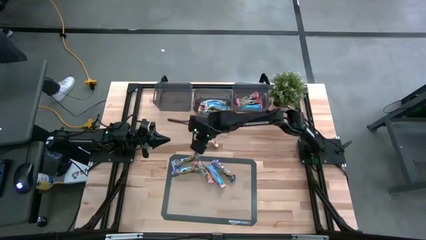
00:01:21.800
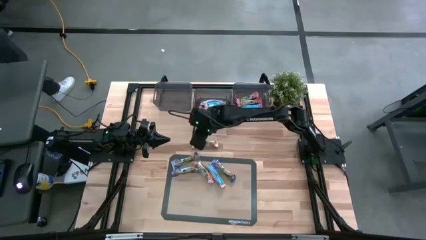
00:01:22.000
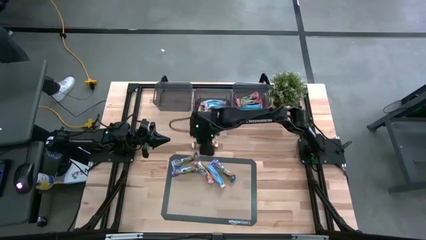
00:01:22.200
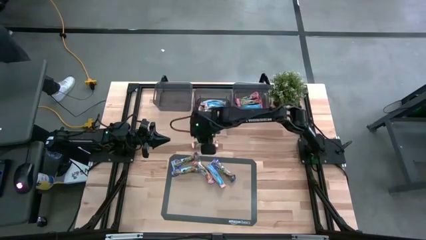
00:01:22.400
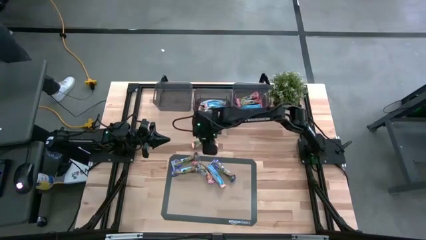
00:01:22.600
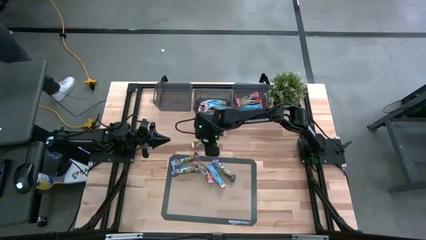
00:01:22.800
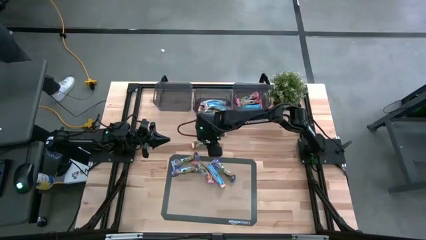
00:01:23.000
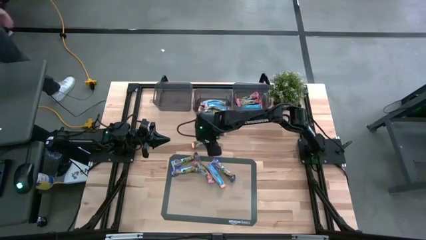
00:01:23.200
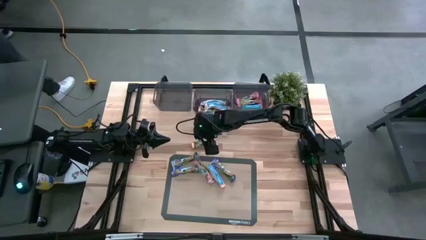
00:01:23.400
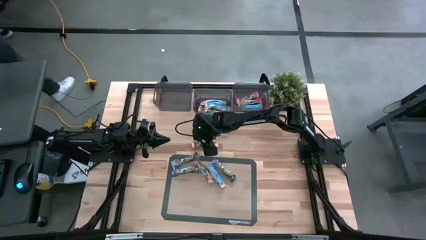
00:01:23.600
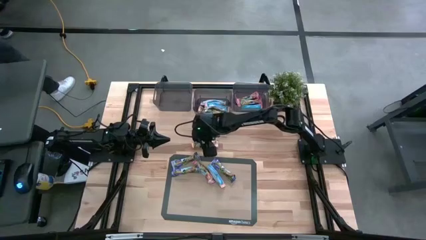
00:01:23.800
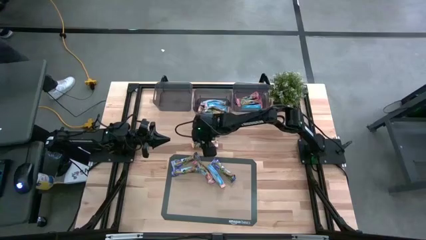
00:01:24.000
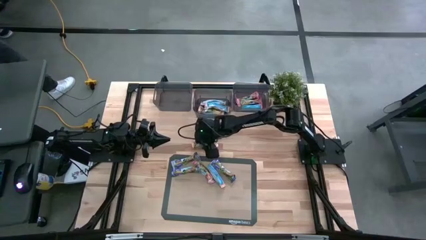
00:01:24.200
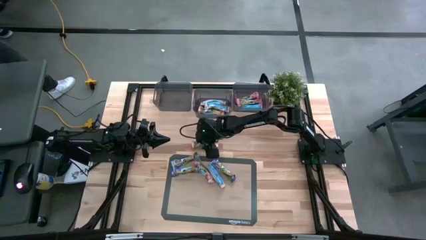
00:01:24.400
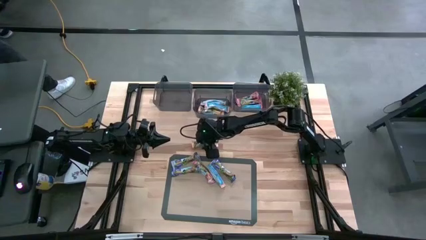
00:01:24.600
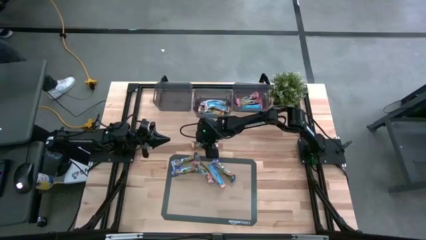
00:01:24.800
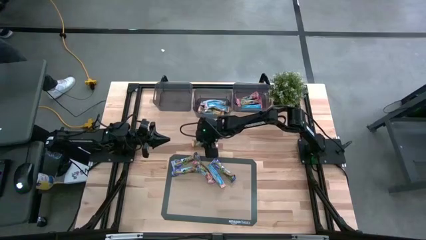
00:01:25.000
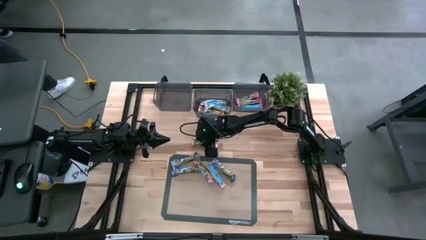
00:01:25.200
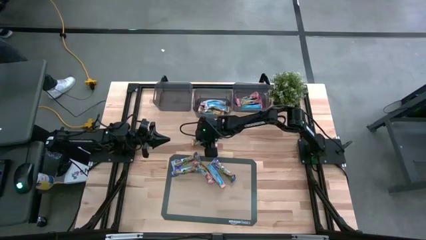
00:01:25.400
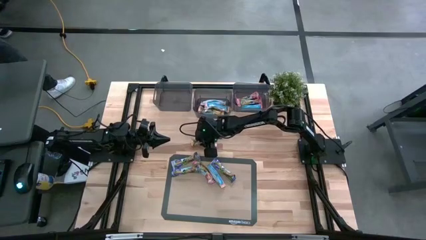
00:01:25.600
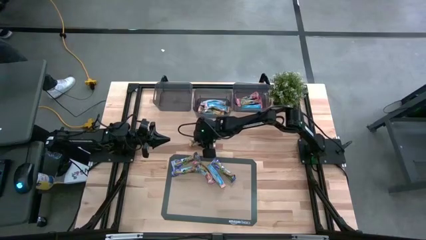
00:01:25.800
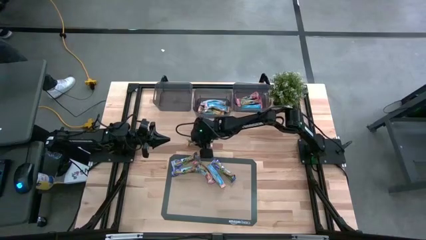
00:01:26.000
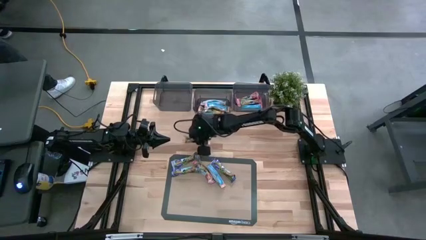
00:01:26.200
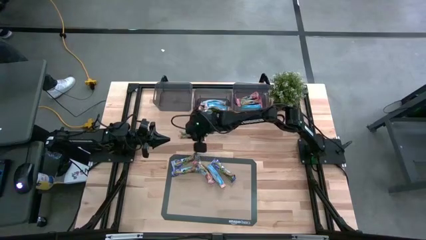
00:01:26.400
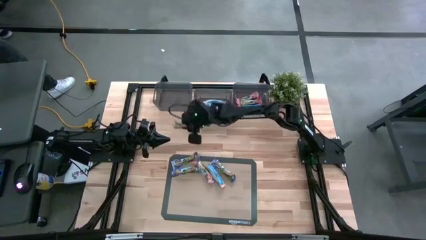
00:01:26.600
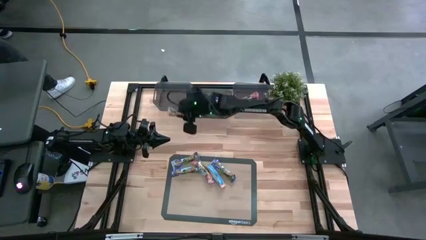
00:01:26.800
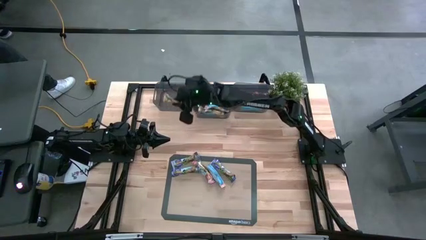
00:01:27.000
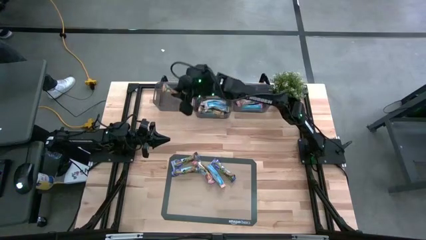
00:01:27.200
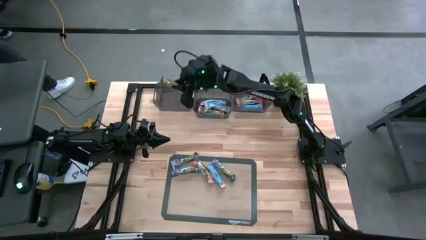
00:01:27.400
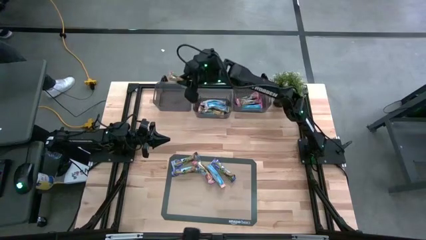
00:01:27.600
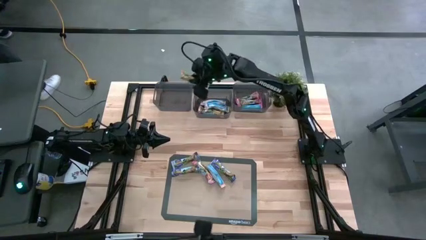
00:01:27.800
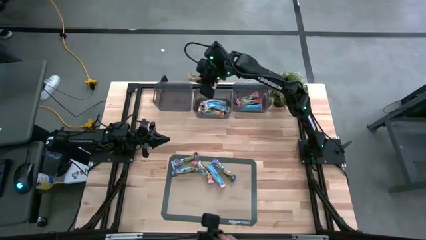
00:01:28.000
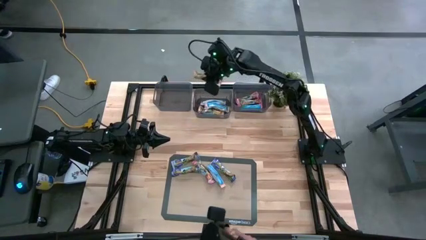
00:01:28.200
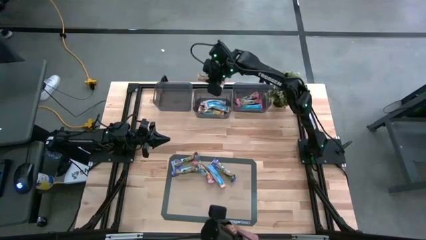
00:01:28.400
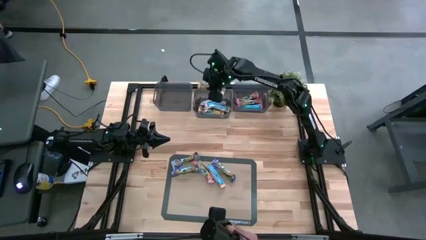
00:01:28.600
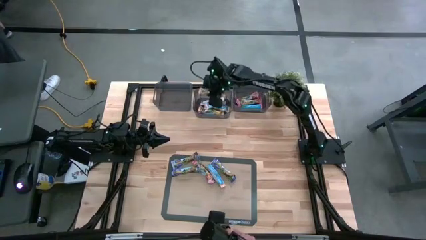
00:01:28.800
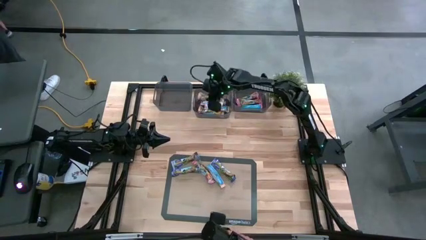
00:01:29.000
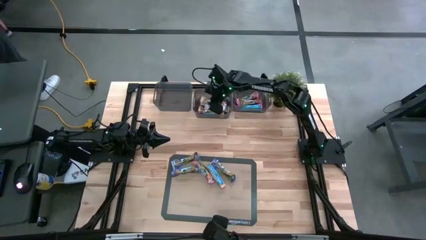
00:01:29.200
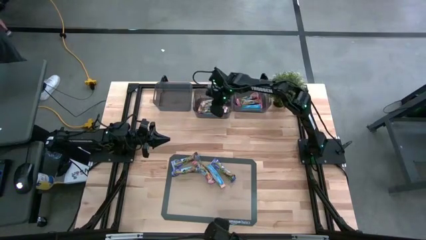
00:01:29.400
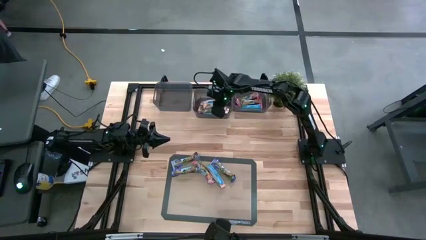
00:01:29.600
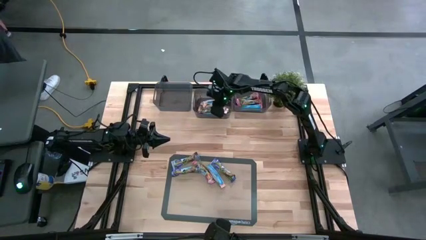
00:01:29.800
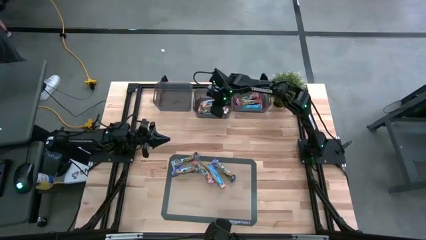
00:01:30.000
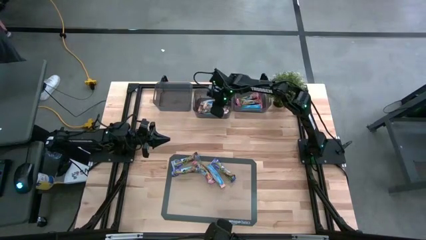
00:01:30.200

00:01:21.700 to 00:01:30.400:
Task: Pick and place Granola Bars by type
Put the yellow granola bar into the center black bin

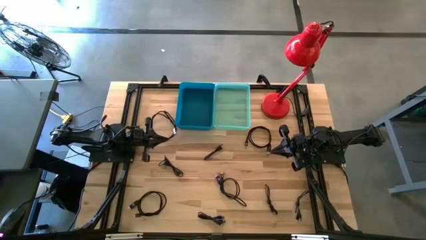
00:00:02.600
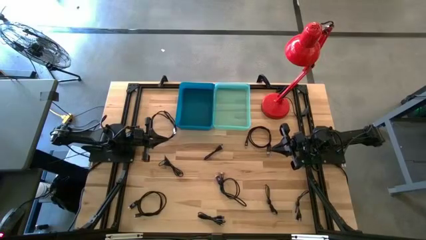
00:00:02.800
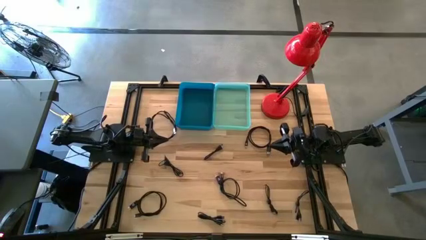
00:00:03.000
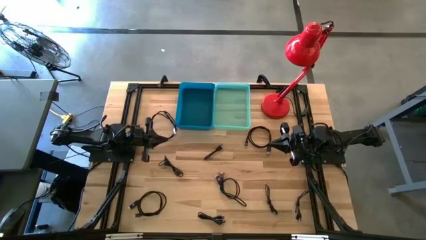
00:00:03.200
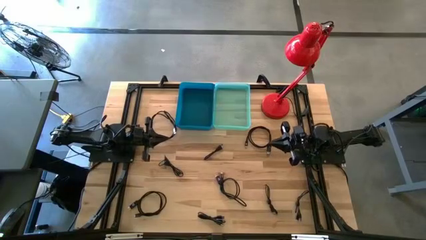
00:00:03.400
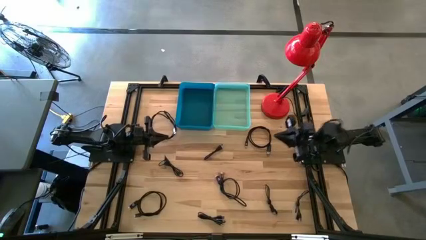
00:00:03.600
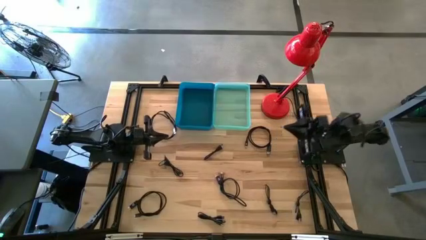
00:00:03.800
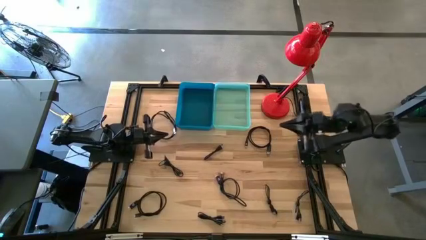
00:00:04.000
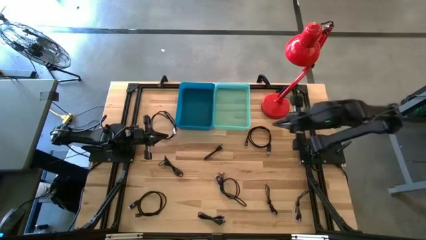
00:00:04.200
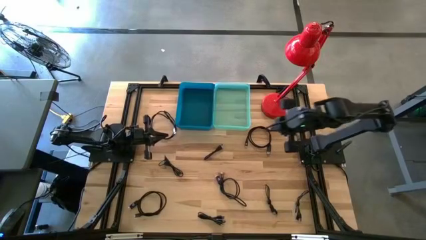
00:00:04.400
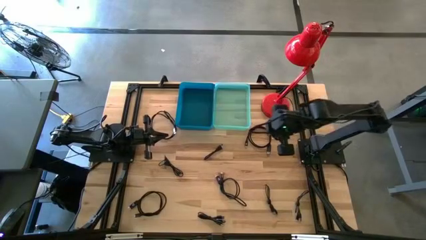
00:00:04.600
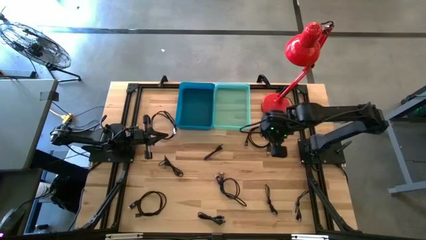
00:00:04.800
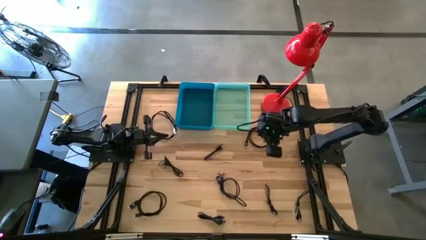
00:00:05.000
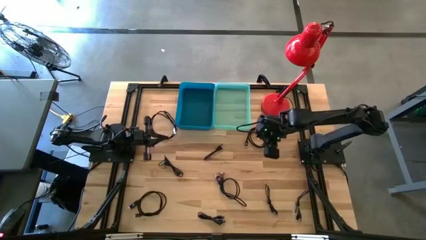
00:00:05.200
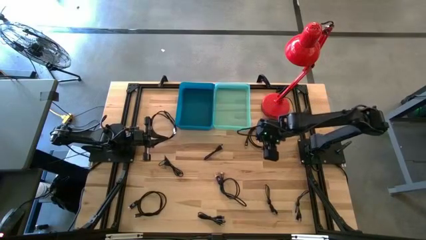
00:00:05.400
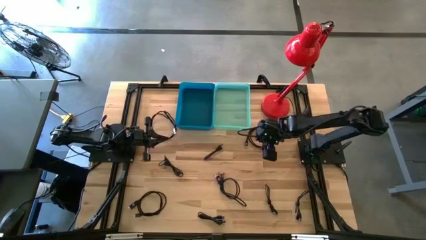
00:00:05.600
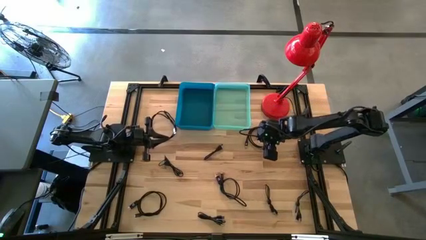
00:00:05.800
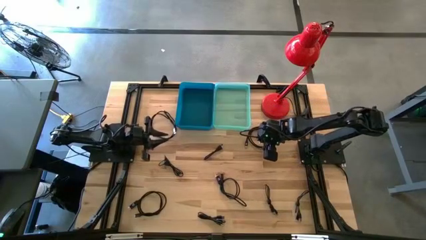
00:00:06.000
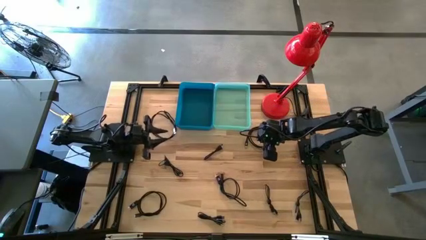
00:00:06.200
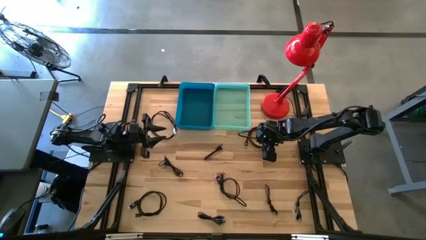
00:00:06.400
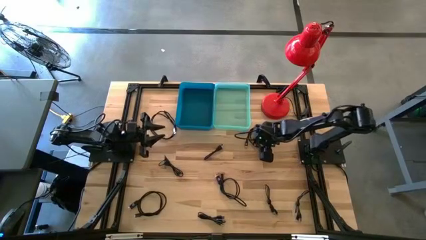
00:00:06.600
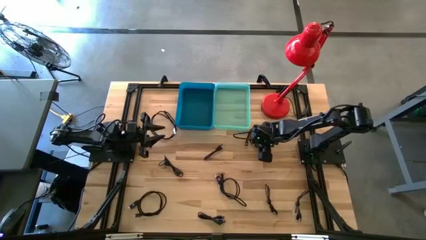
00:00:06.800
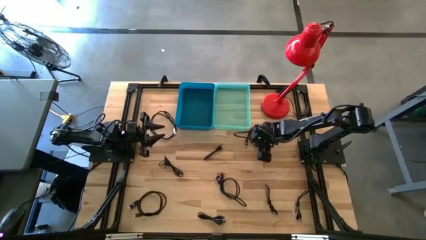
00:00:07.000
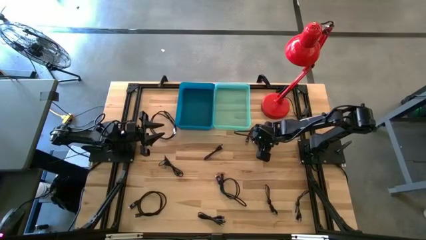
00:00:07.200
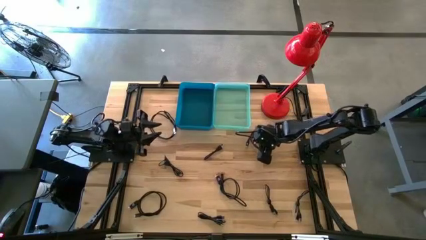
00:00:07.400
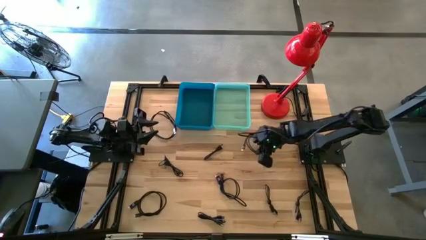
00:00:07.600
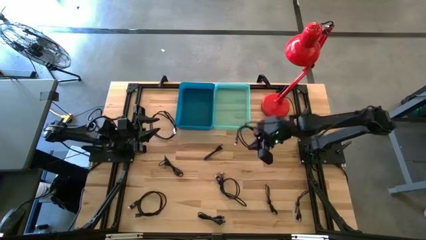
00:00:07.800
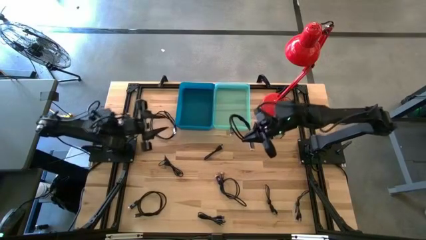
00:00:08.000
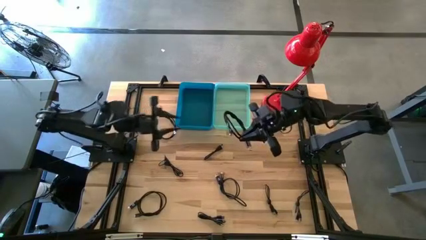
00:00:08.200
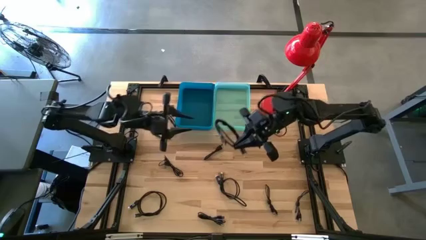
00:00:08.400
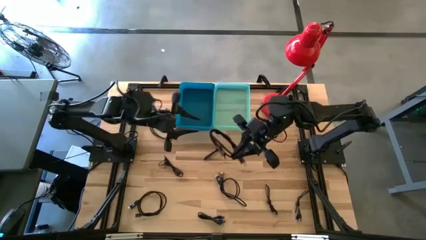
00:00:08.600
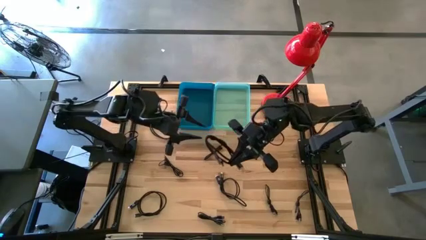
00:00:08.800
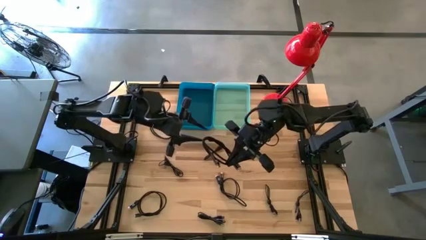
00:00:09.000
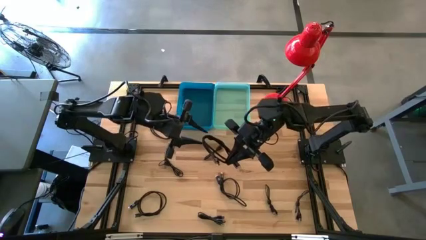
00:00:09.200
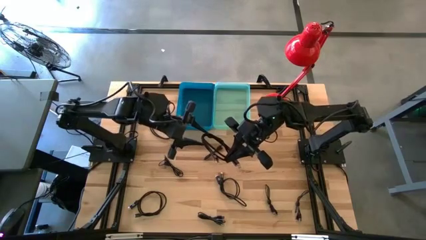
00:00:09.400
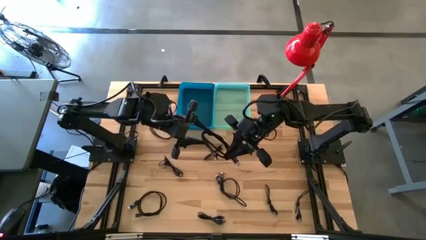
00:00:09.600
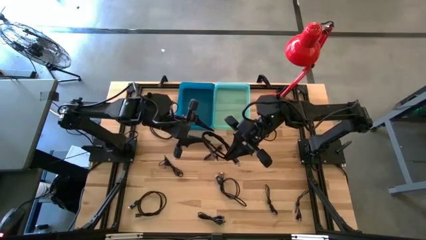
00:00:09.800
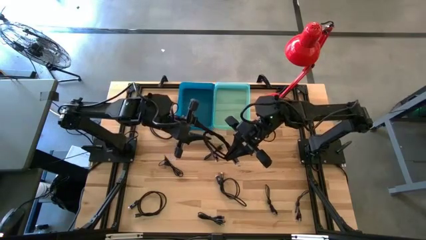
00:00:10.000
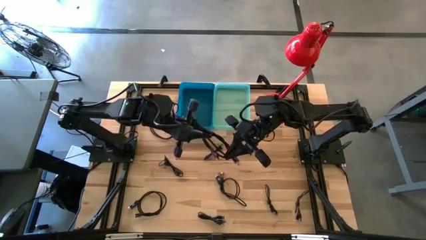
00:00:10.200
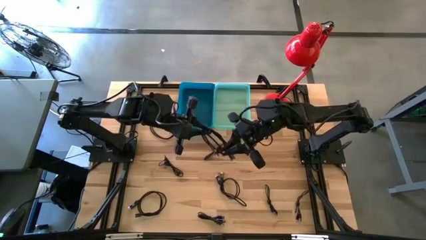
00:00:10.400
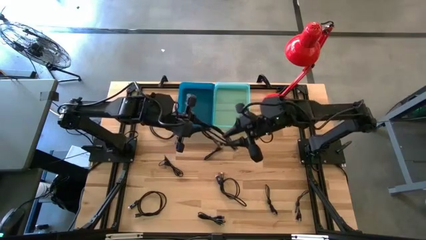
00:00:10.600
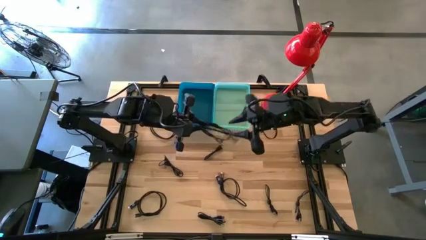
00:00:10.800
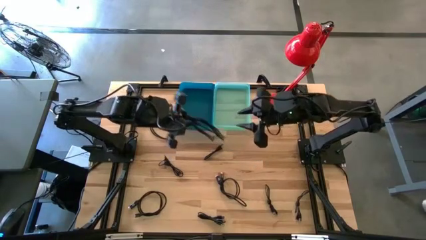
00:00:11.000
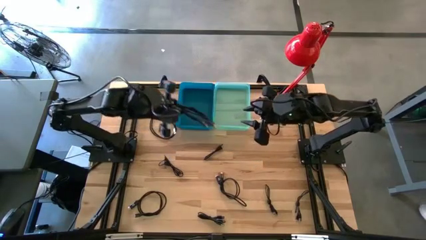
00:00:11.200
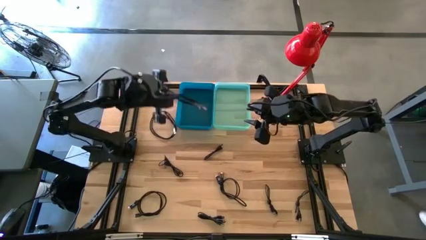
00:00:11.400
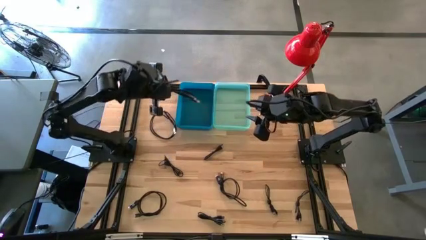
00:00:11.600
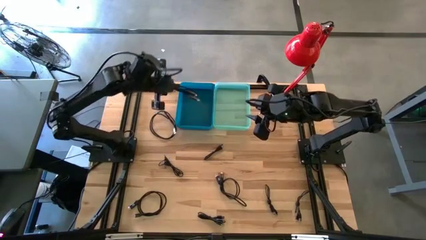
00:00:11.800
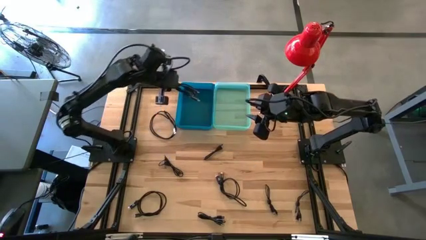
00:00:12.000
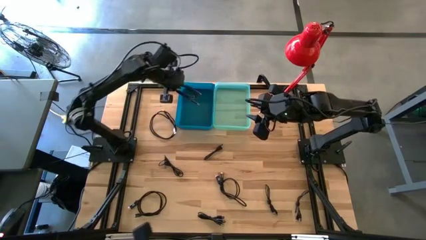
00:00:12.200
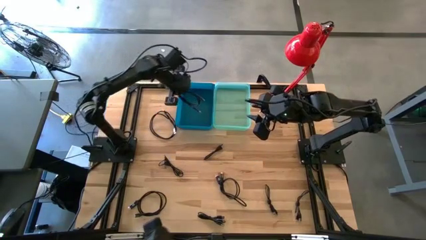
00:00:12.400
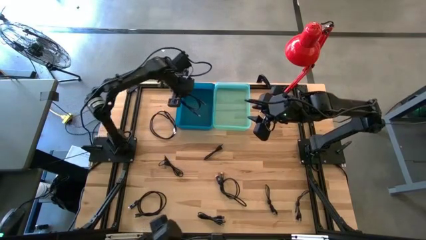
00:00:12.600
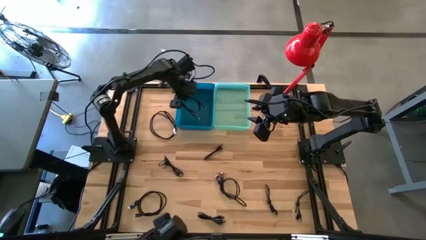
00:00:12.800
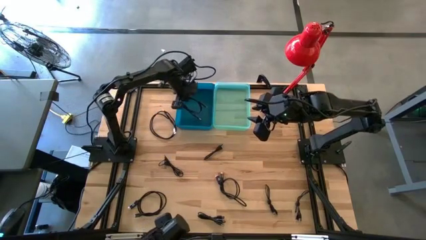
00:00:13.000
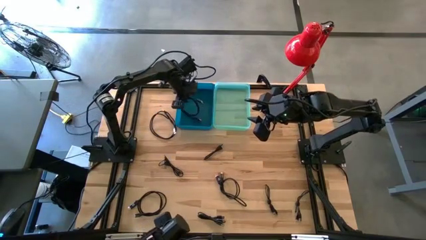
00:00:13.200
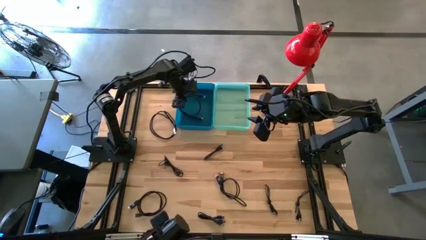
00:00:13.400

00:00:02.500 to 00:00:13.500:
Task: Pick & Place USB Port
Put the black charger cable into the dark blue bin
